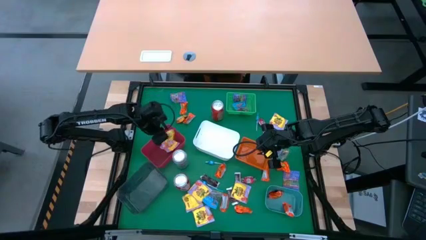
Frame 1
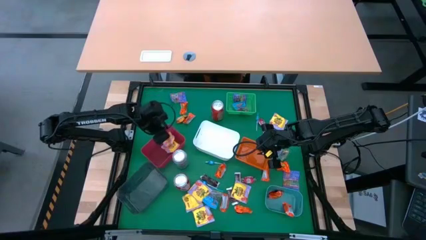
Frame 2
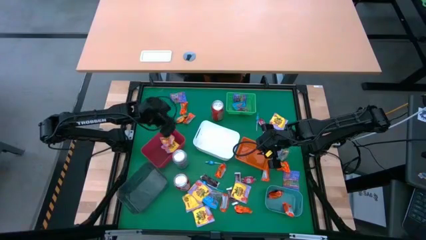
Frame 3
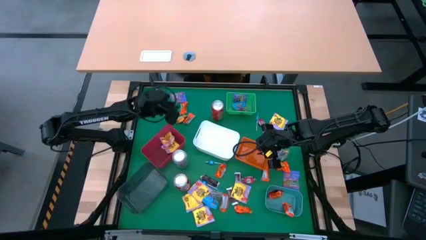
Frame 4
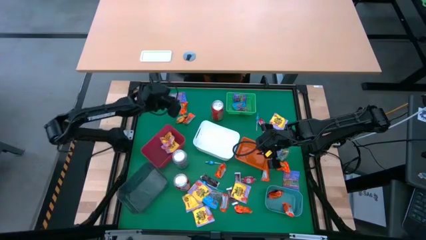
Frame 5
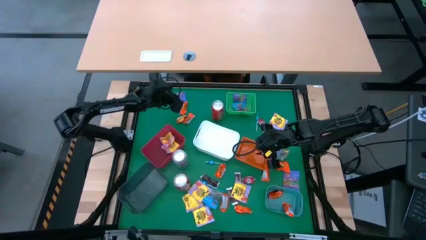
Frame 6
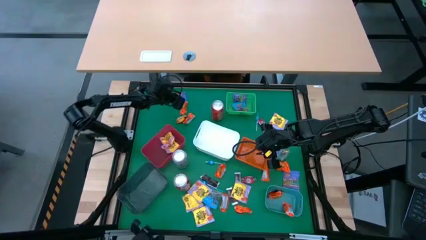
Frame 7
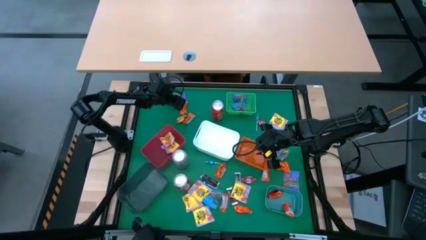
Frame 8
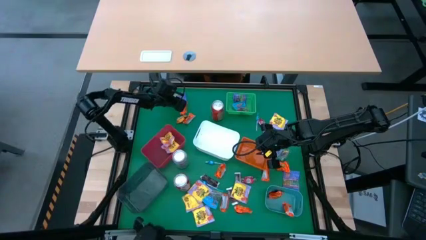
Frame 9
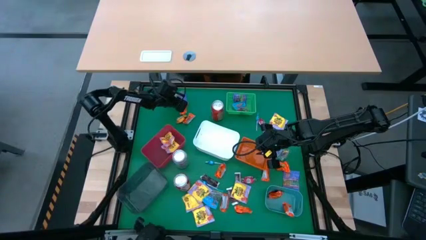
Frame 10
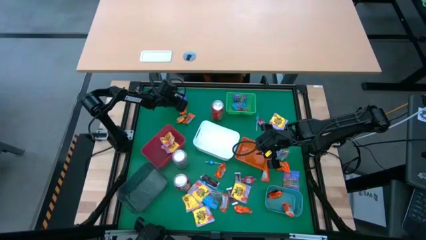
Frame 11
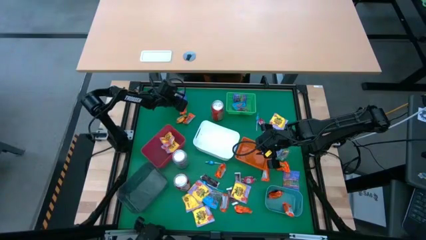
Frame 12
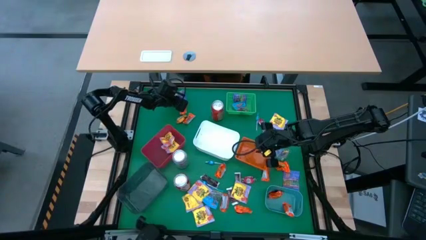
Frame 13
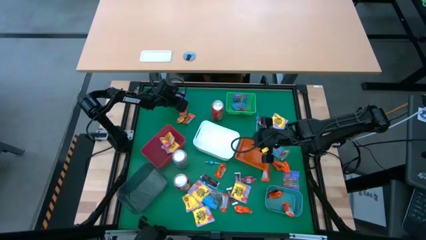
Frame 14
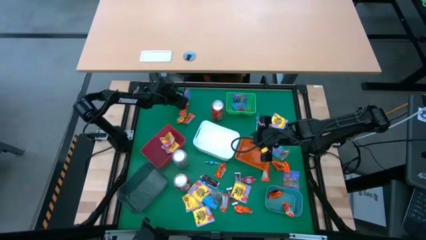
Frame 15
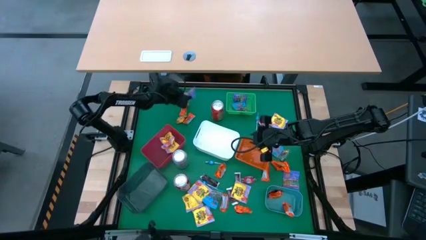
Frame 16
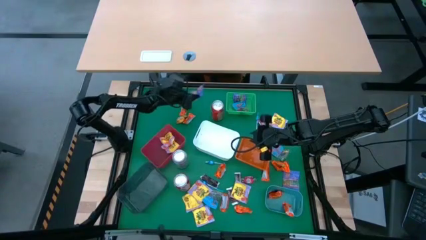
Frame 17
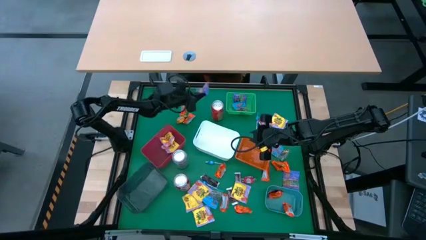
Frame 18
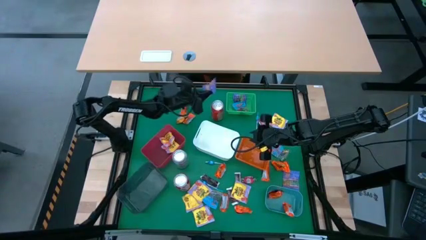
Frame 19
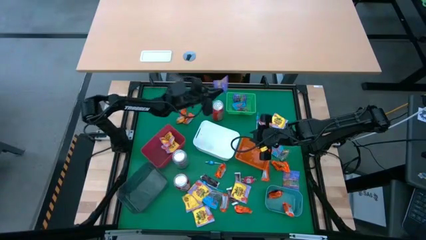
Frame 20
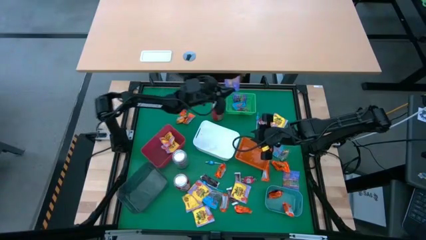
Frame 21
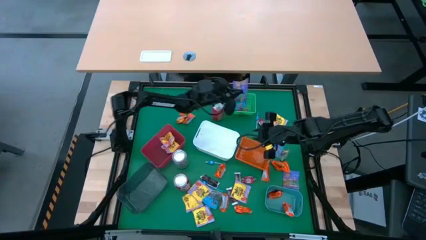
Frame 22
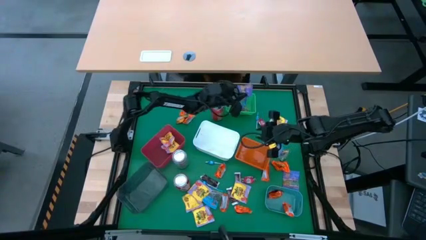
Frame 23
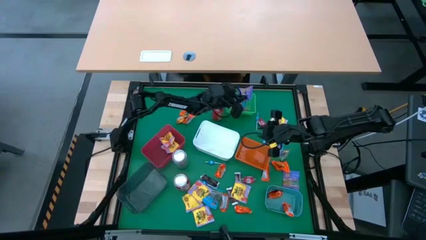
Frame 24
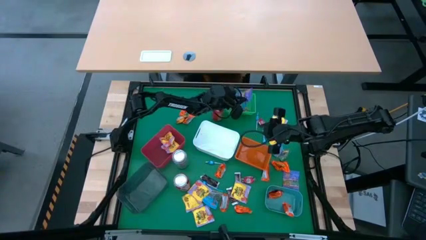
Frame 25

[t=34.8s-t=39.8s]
Task: Sort candy
Put the violet candy into the green bin

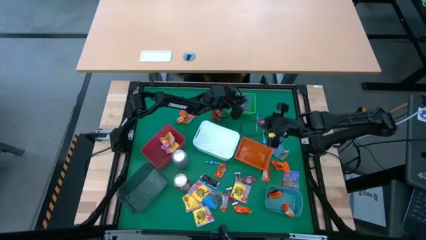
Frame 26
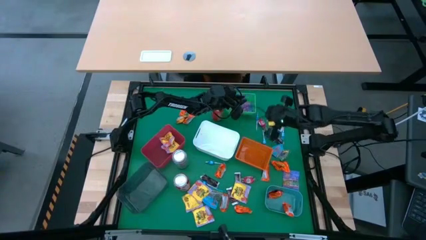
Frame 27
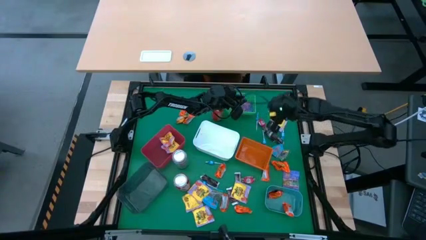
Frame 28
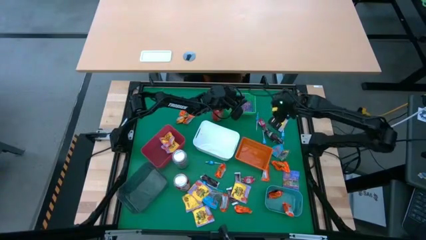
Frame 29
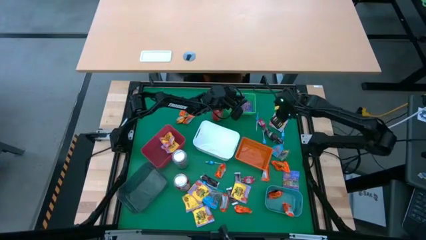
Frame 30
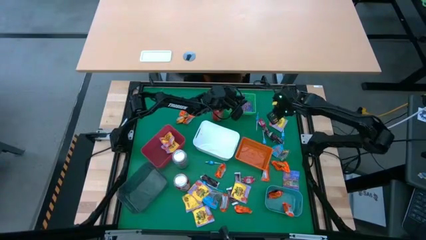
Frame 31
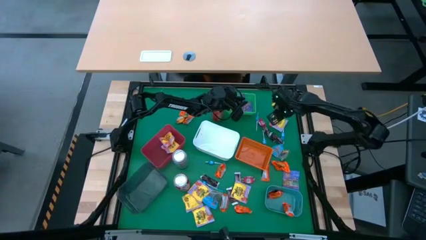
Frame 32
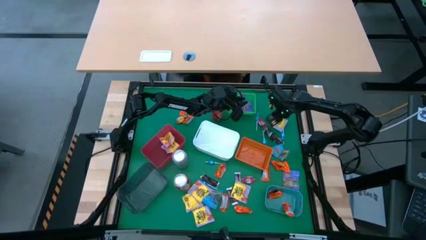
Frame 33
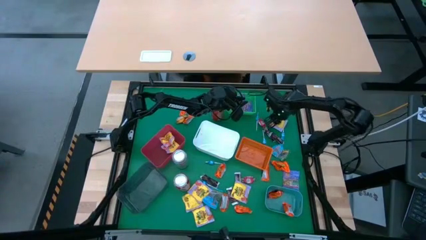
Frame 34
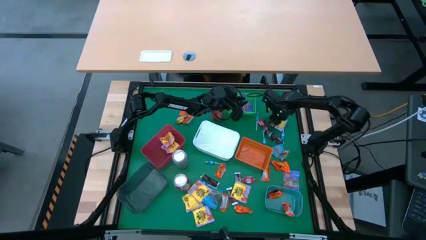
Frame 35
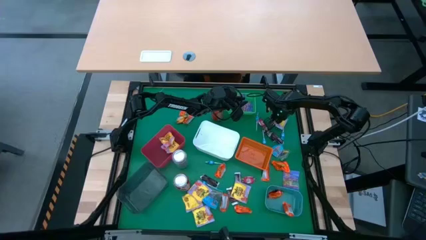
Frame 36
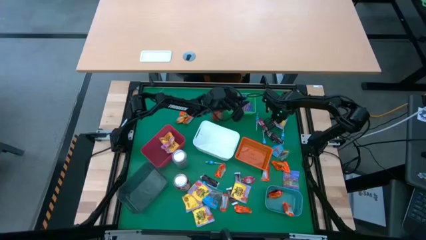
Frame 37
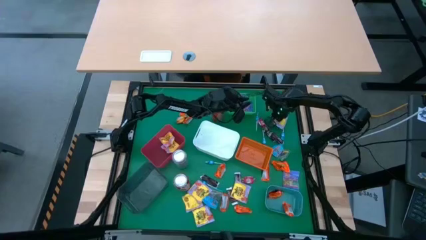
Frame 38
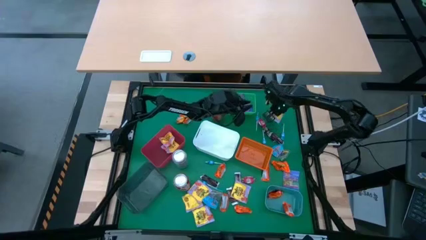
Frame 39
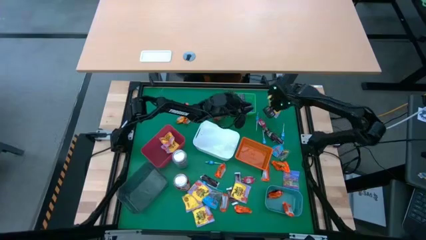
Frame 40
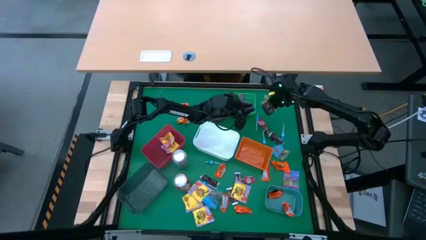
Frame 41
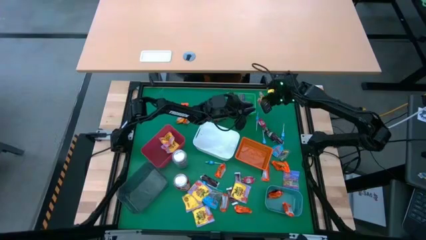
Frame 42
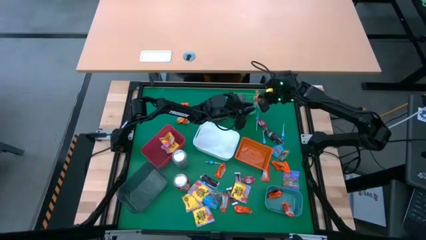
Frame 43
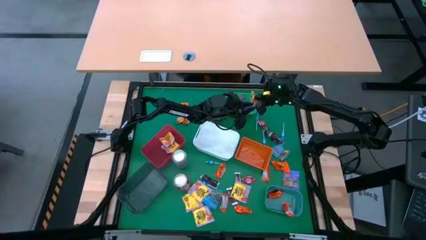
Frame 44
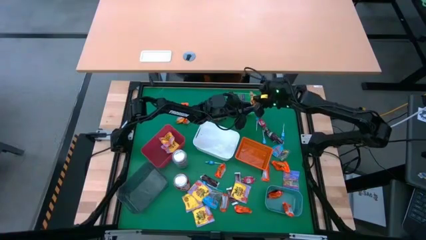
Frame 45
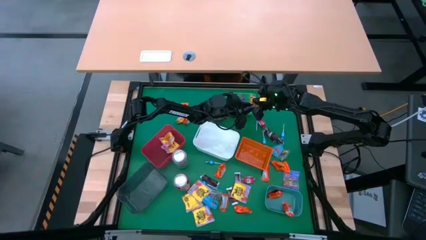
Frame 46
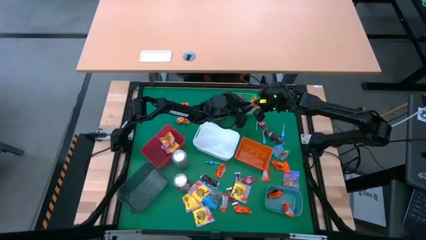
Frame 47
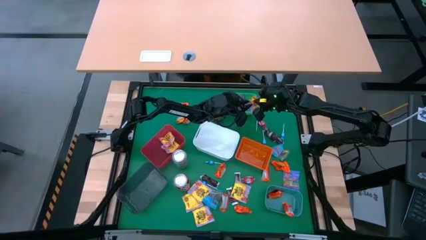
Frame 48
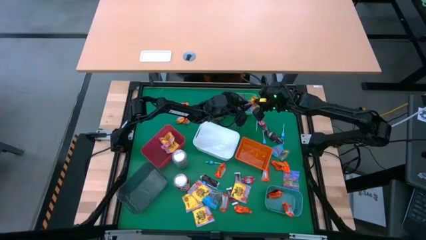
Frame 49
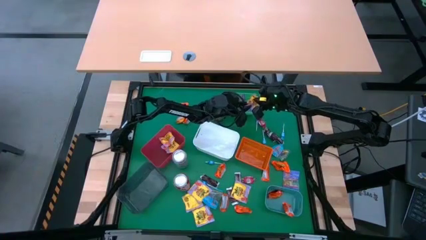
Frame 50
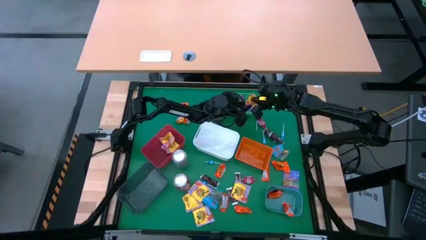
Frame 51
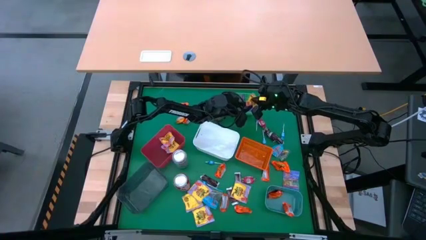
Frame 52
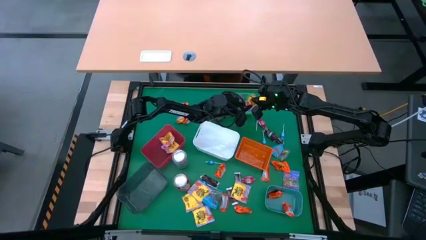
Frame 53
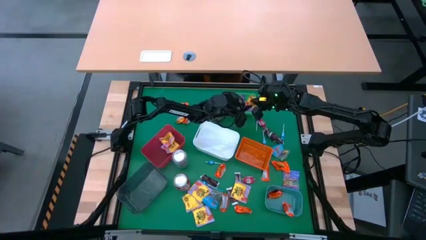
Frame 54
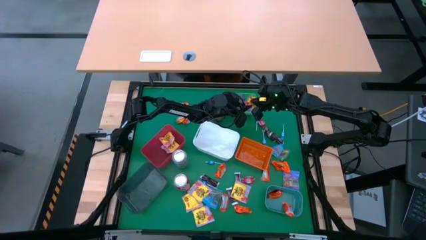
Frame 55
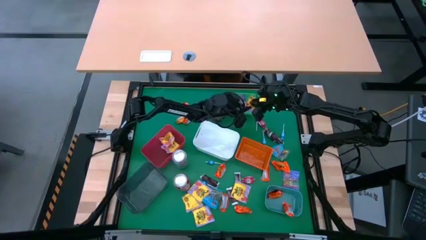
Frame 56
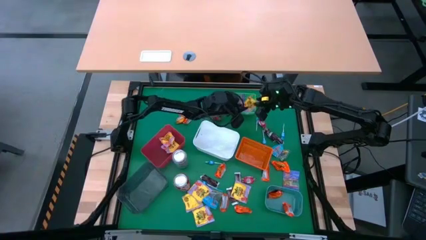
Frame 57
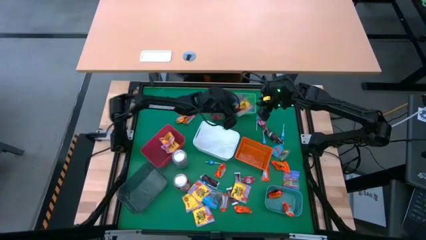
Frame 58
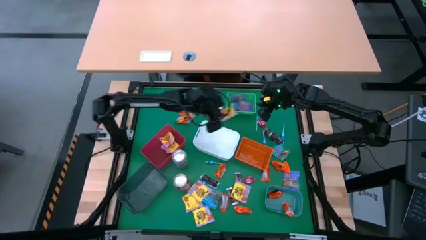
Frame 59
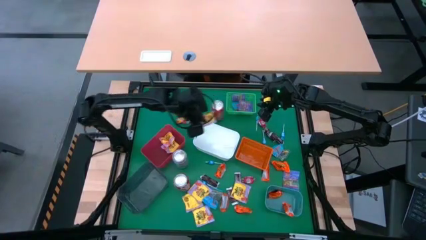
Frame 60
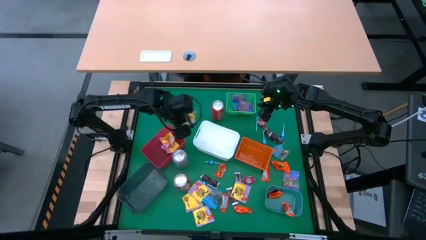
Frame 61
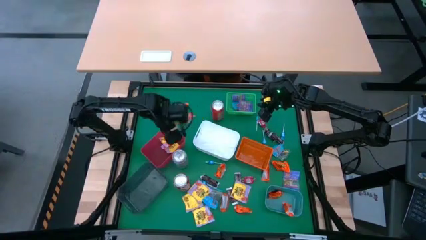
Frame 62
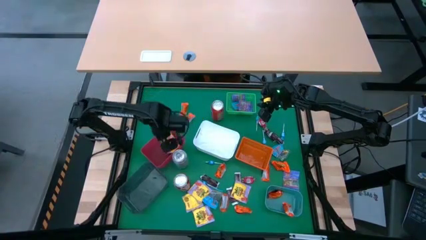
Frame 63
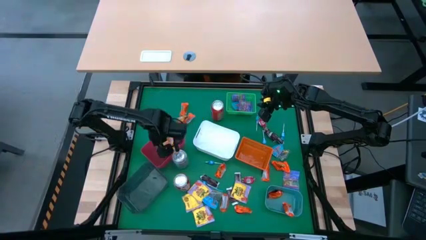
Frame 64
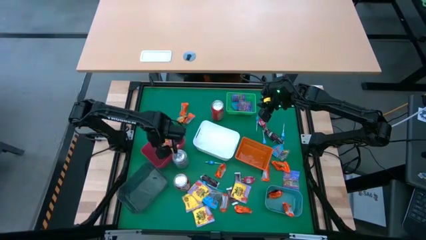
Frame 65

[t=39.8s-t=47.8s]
Put the yellow candy into the red bin

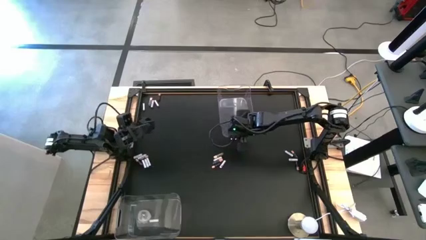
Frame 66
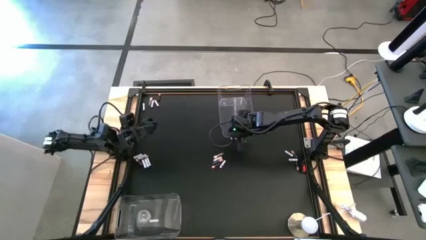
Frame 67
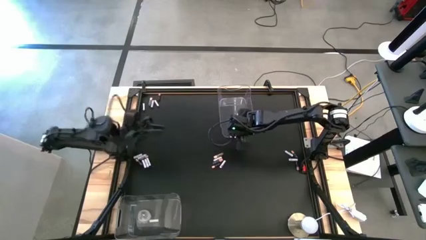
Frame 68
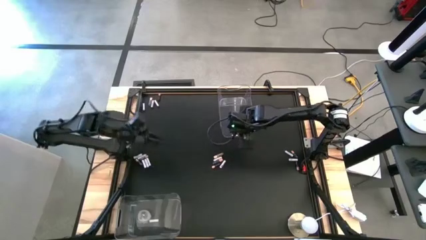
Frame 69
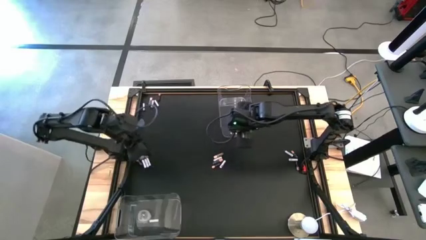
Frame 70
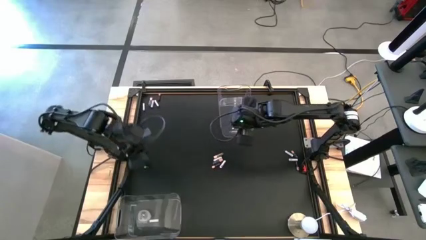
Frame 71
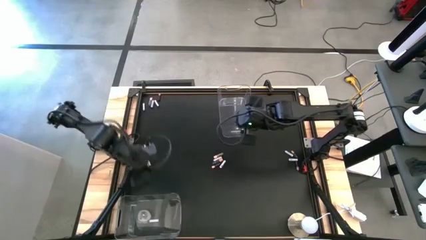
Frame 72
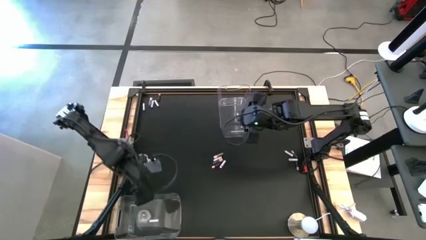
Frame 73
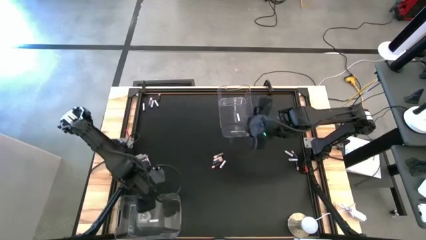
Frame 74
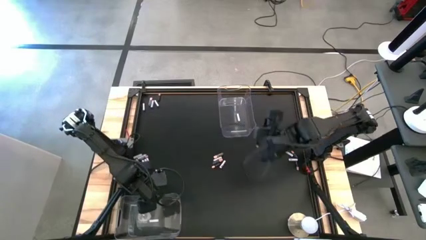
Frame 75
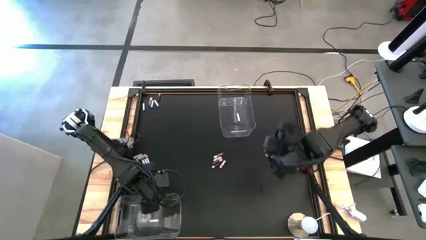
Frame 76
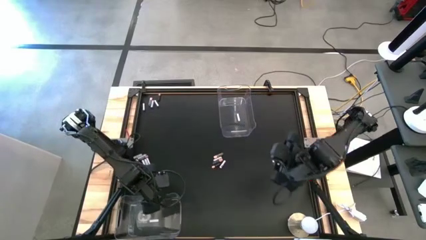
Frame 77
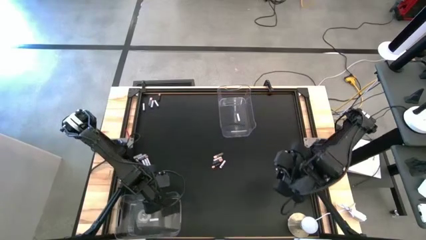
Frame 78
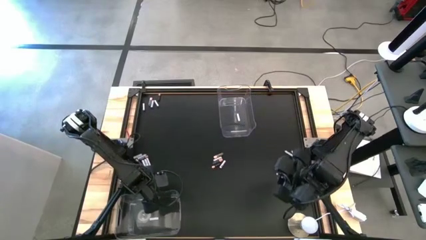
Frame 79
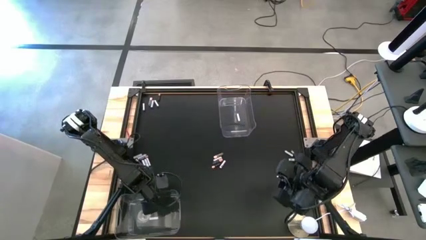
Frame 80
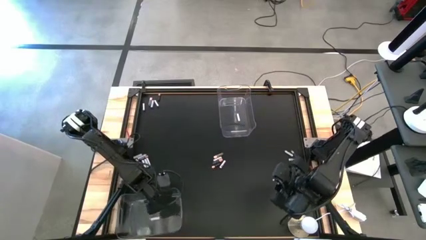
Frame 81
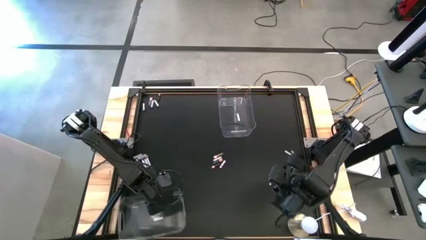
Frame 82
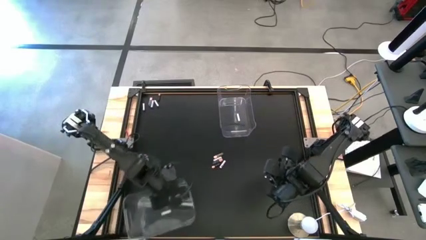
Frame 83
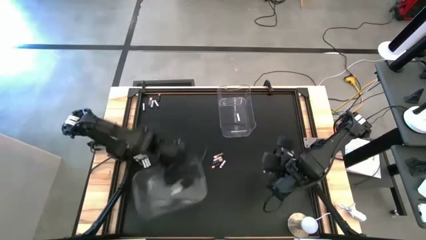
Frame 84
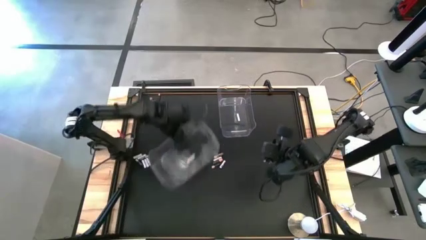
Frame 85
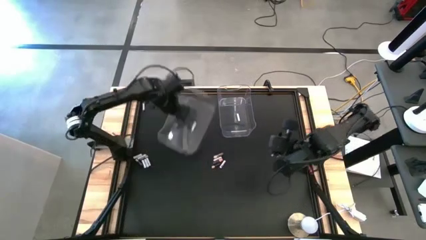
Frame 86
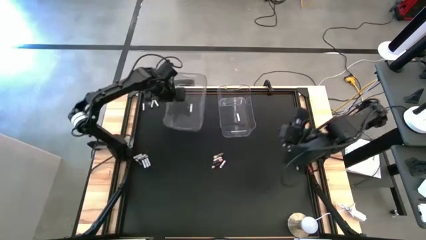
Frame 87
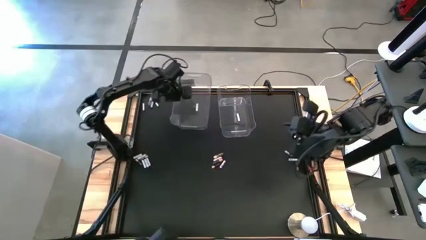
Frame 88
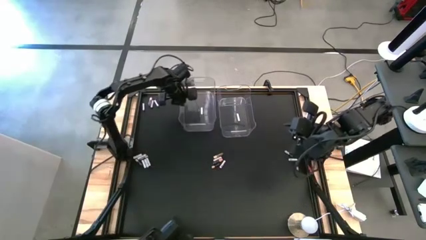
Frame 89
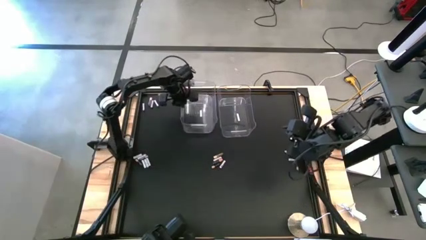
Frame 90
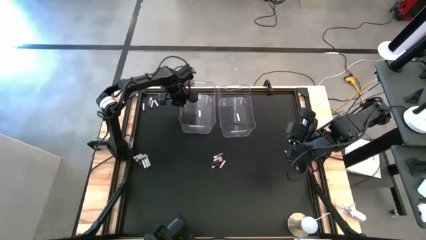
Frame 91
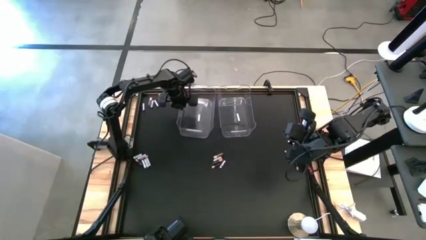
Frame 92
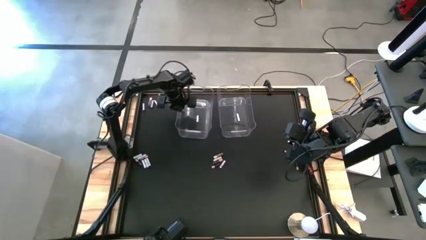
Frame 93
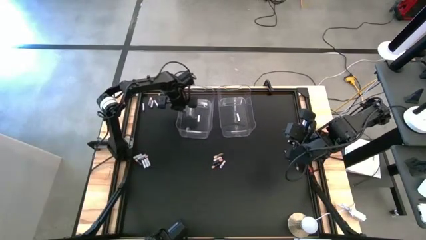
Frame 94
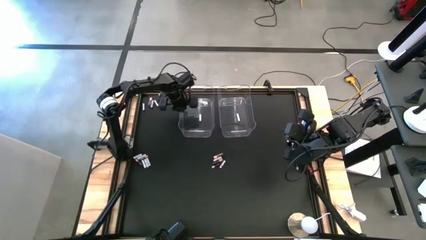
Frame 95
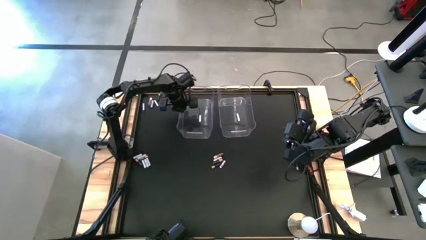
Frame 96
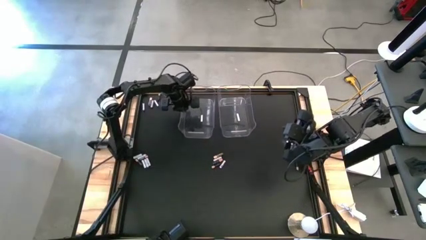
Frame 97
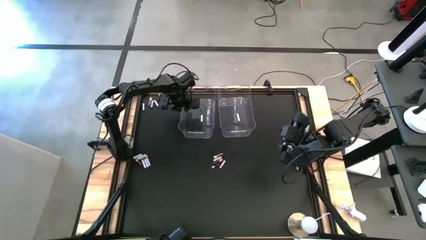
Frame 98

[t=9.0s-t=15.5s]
Task: Sort batteries
Move the bottom transparent bin to the top center of the table
